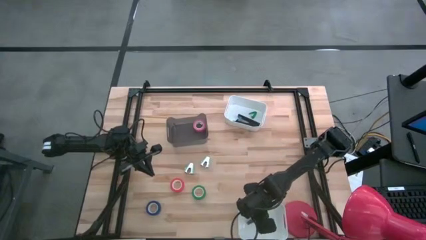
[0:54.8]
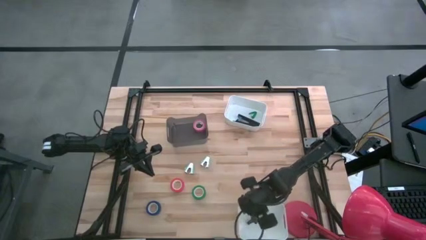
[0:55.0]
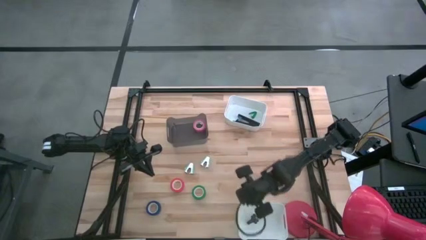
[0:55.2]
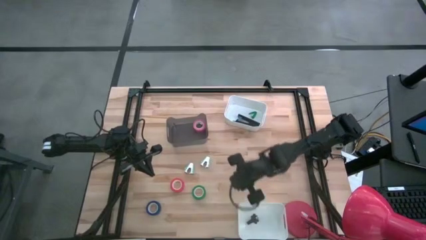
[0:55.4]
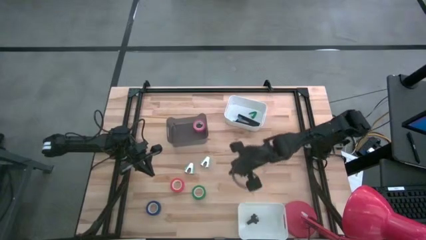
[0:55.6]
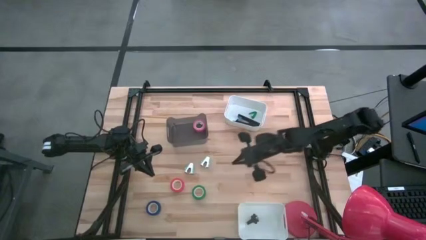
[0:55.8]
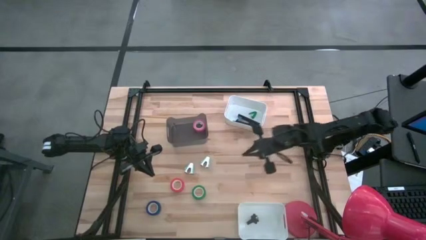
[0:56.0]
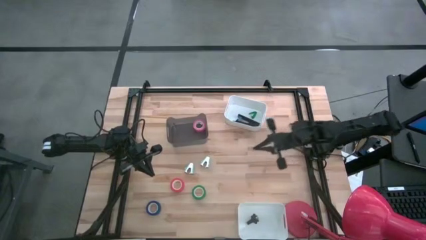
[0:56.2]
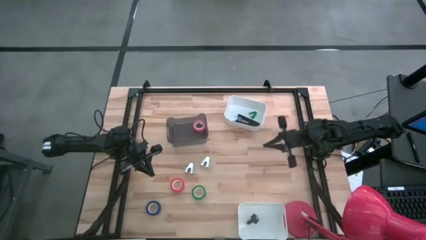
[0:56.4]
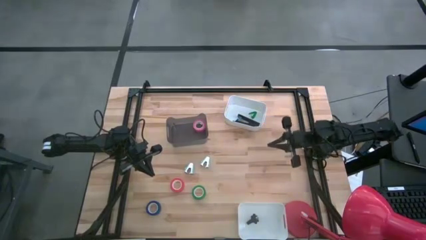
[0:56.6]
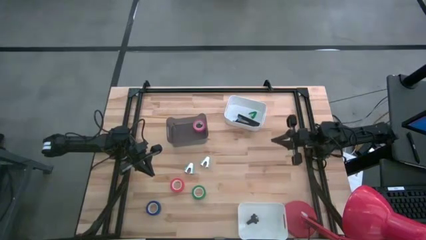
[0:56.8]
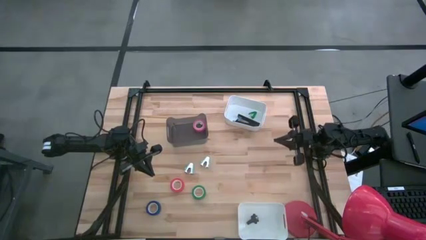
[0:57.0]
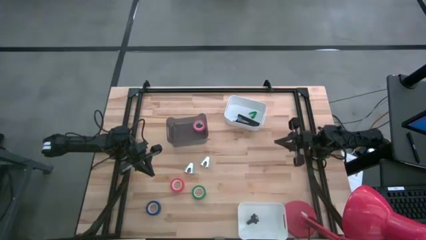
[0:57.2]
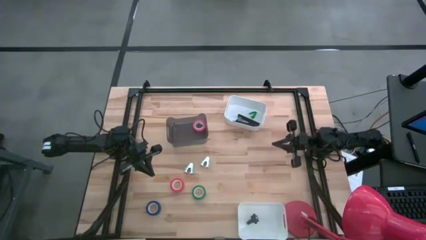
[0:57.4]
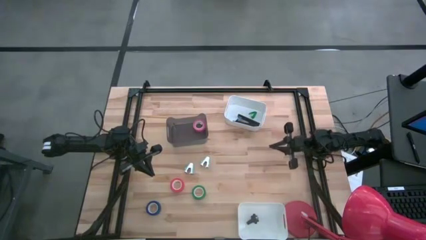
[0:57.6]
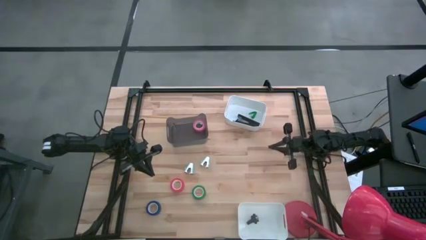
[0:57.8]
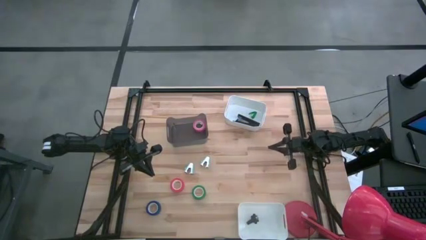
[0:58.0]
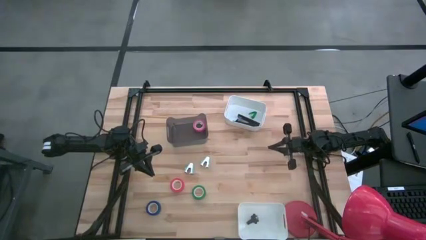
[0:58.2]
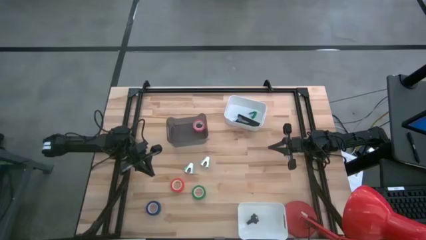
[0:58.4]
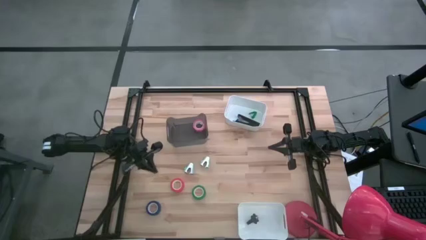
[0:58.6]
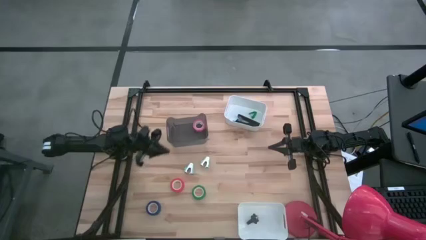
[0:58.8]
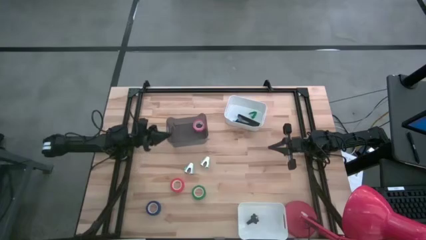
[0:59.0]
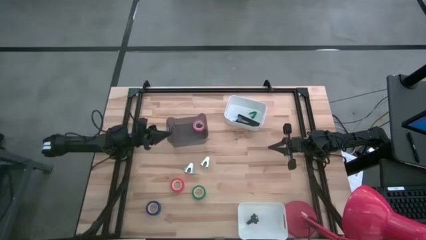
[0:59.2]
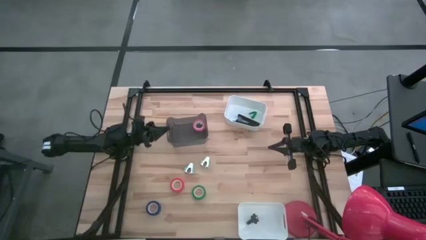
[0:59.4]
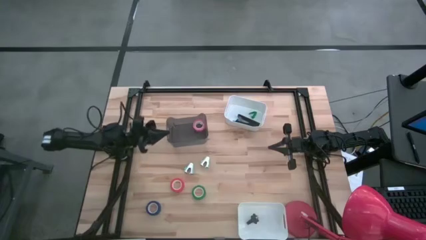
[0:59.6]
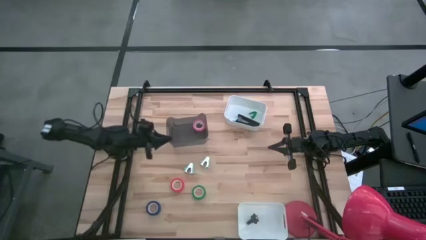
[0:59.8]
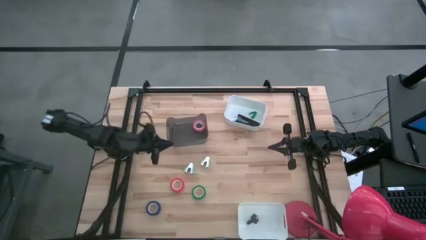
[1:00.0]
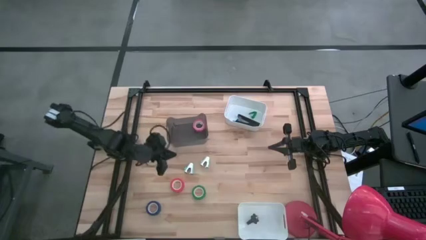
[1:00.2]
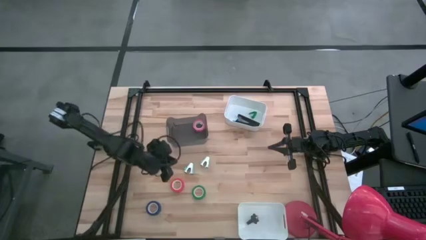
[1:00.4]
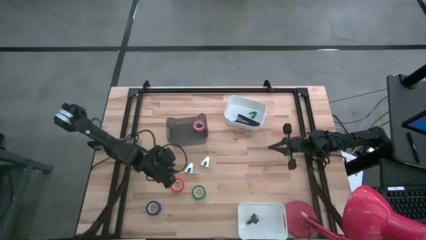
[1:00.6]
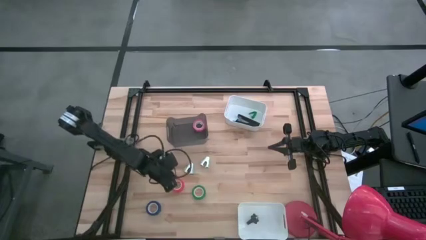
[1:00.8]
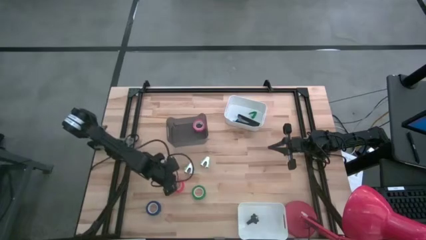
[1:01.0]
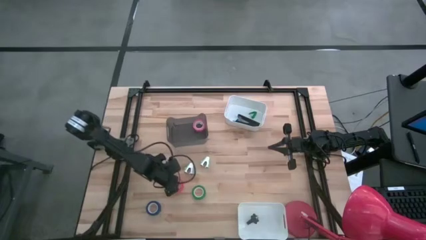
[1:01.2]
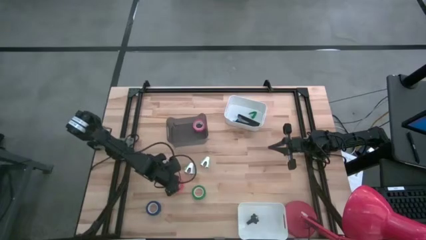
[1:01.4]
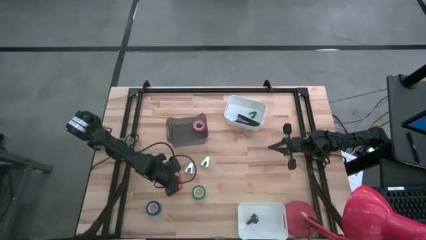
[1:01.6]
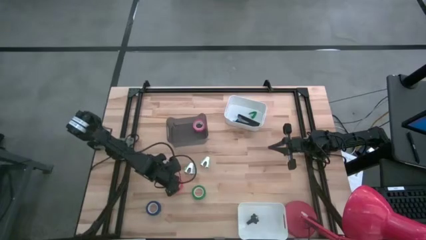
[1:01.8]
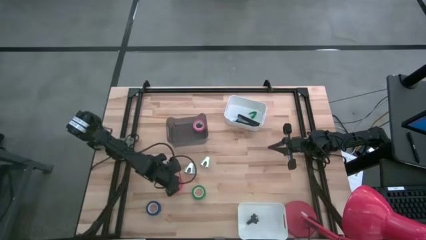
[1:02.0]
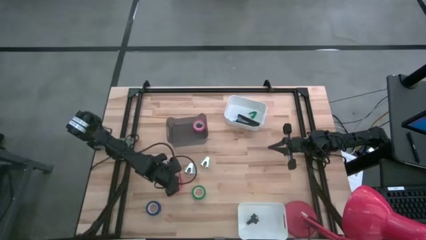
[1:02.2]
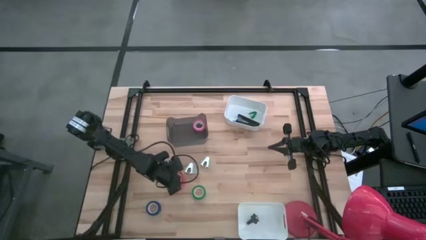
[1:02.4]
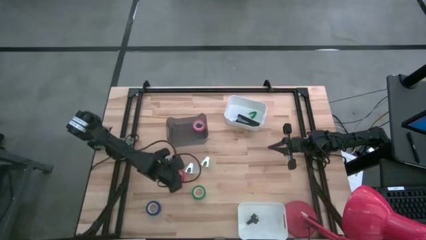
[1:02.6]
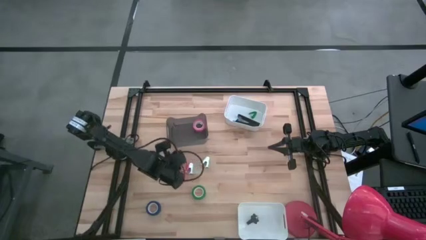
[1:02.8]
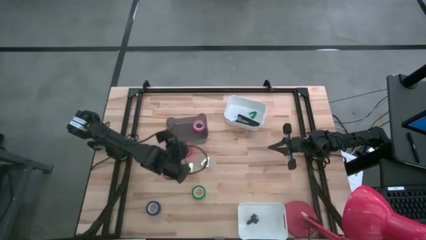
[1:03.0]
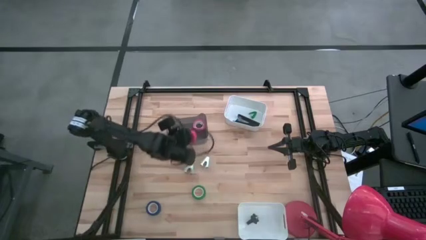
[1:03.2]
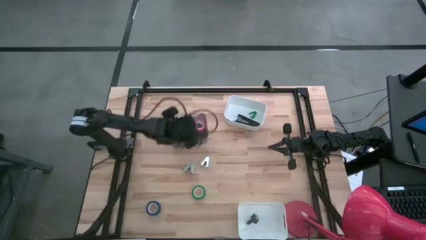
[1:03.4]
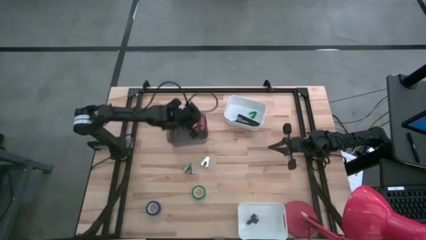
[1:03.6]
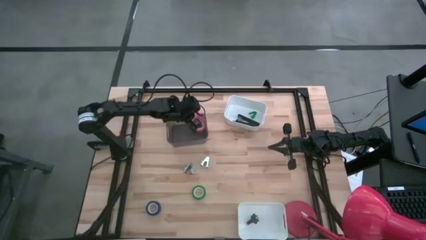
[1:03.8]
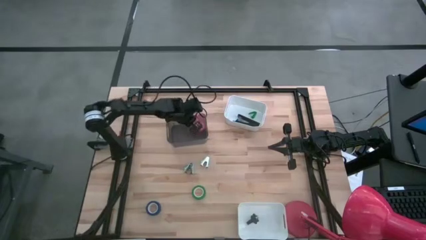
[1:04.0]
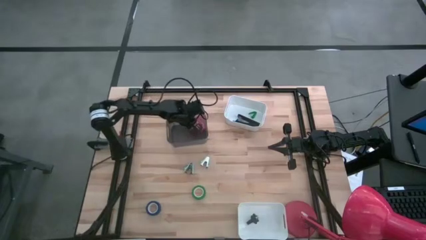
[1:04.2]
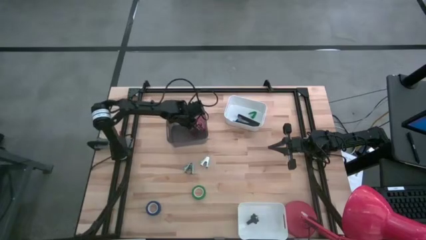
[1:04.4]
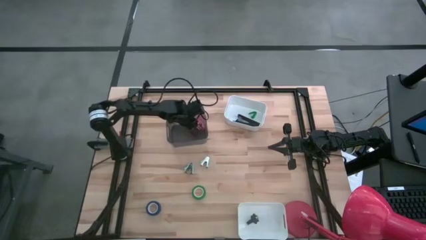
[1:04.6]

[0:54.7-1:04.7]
Task: Pick and place Stapler, Stapler remover, tape
Put the orange tape into the black bin

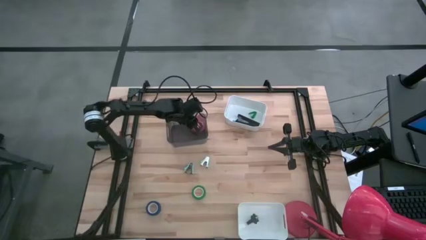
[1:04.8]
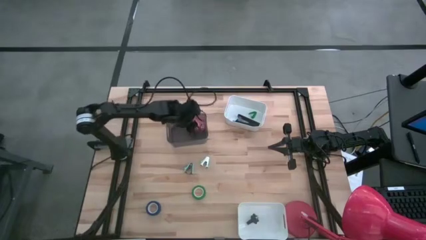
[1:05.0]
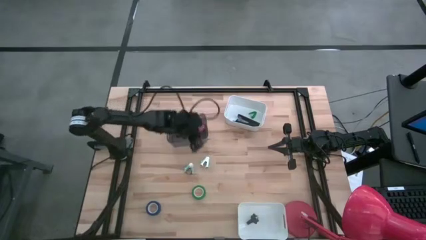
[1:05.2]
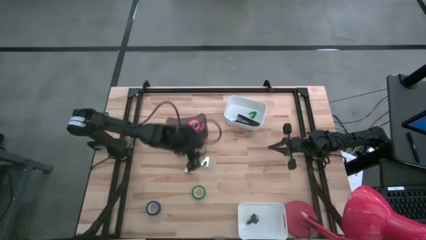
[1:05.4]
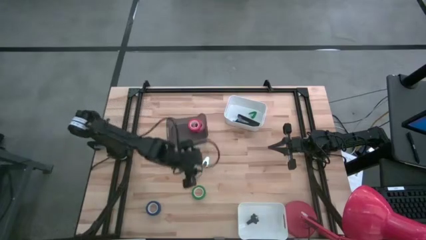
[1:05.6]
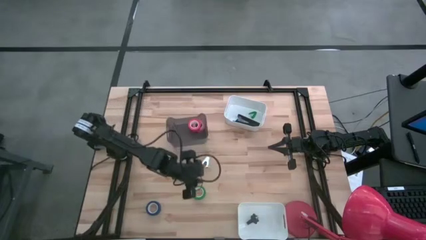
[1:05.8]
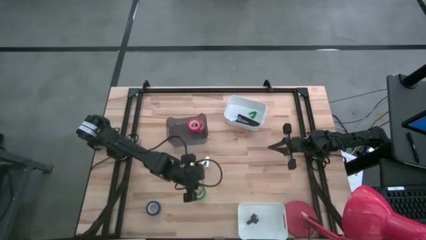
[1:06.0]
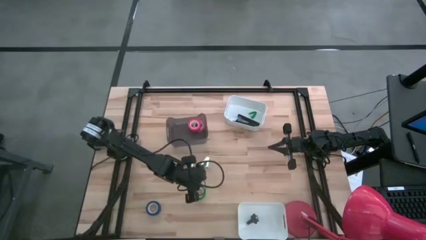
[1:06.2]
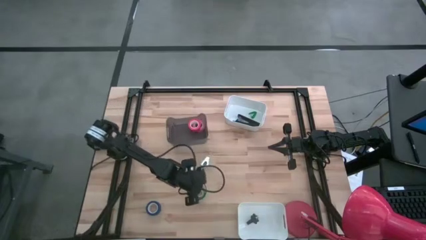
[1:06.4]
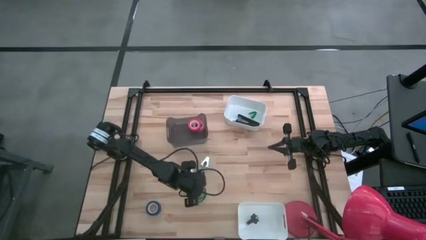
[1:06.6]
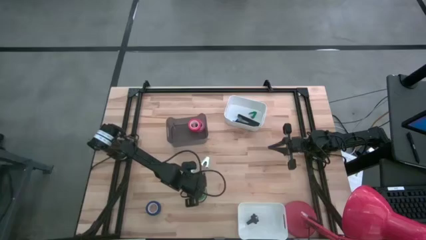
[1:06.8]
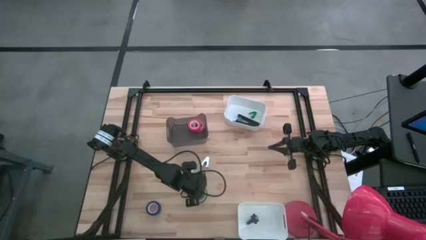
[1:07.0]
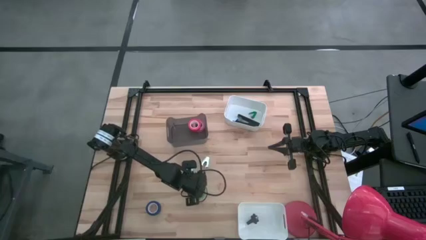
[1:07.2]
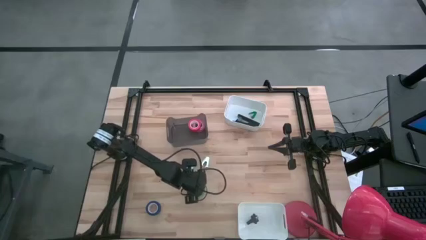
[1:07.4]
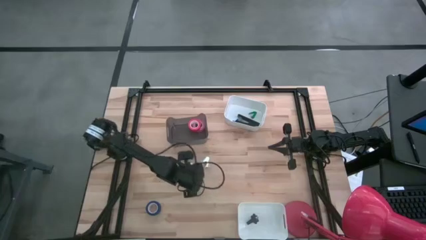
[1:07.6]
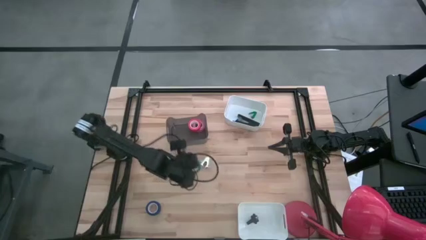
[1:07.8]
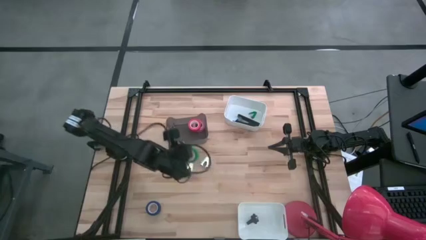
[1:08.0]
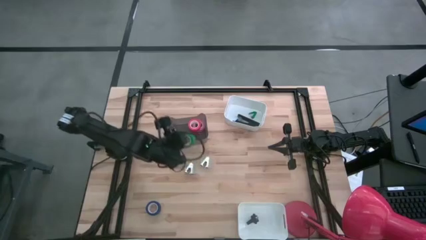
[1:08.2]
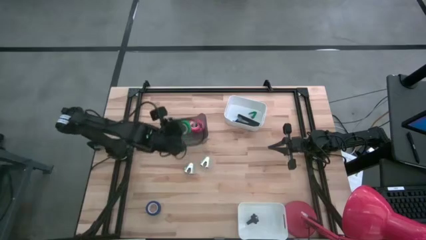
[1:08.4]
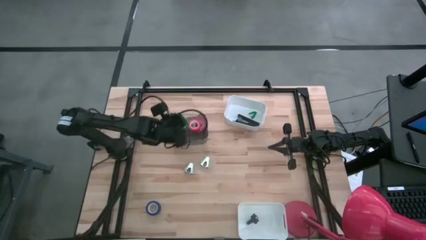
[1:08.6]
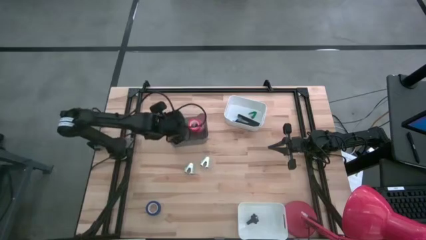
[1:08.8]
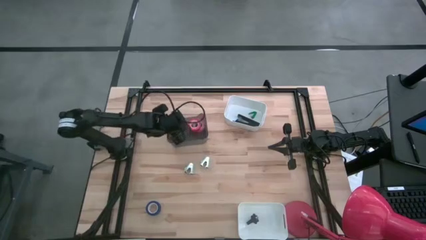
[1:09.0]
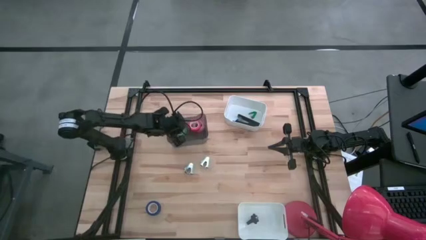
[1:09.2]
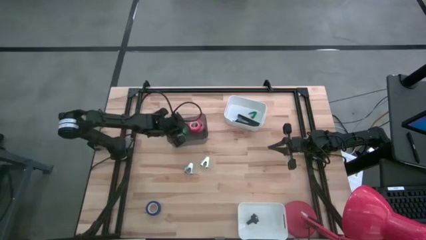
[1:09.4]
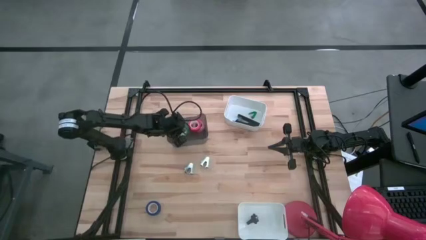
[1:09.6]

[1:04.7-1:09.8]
Put the green tape into the black bin

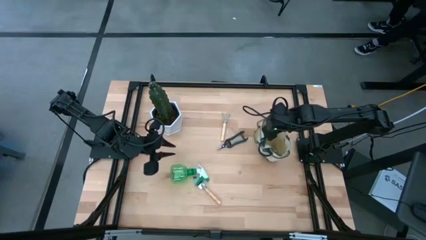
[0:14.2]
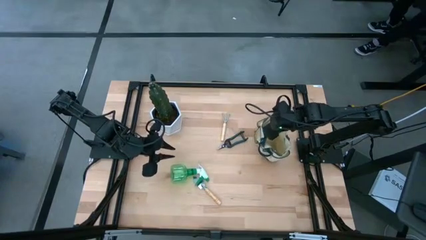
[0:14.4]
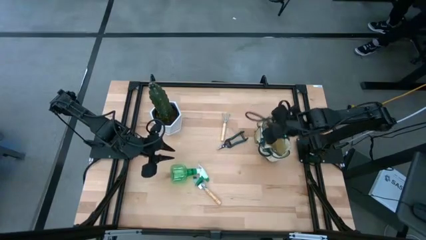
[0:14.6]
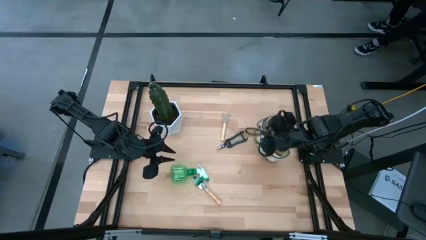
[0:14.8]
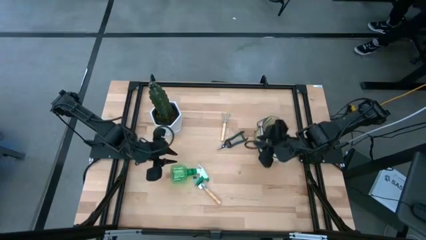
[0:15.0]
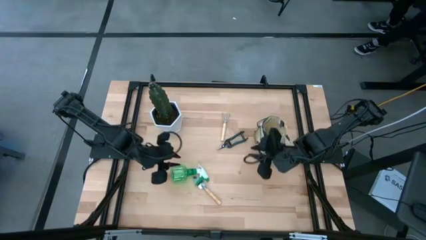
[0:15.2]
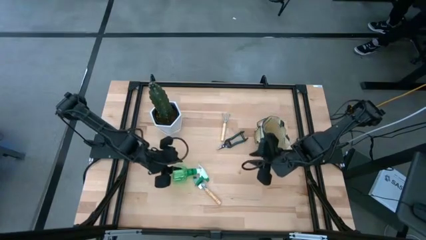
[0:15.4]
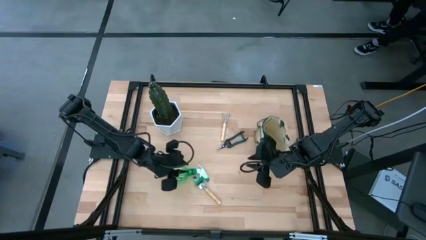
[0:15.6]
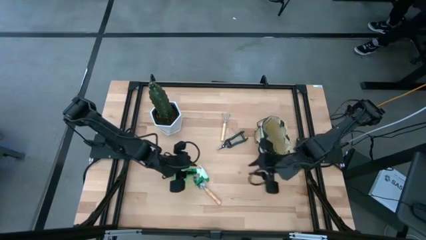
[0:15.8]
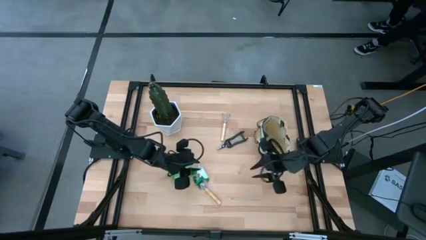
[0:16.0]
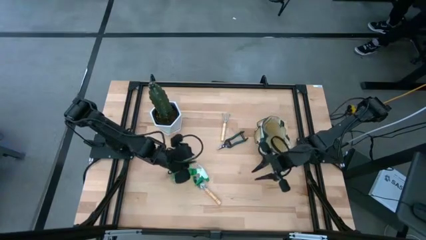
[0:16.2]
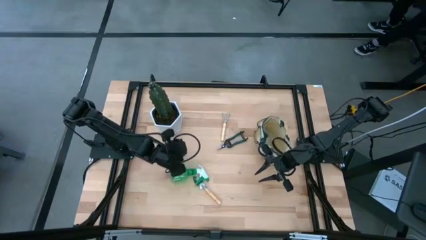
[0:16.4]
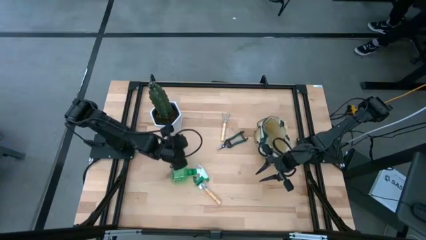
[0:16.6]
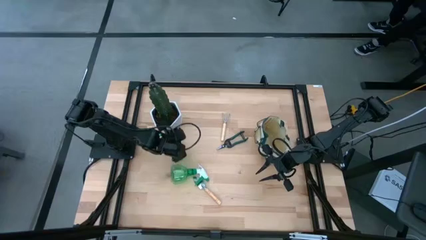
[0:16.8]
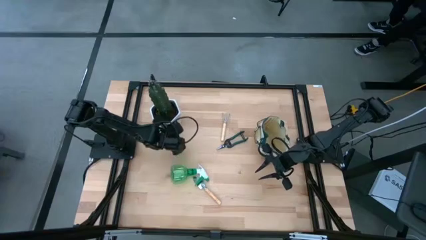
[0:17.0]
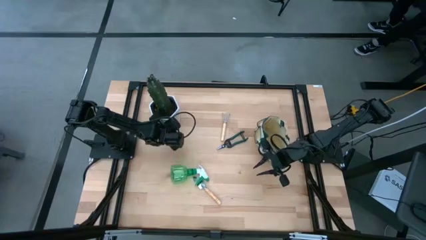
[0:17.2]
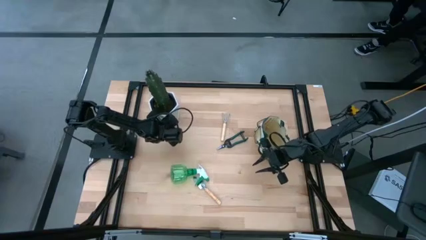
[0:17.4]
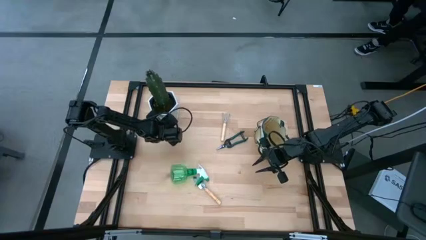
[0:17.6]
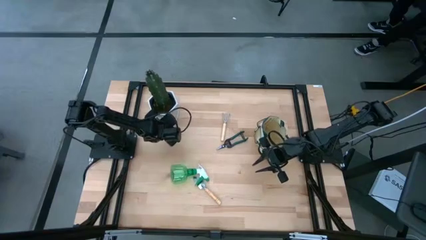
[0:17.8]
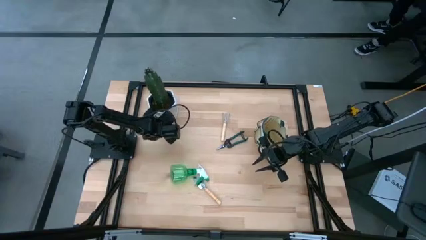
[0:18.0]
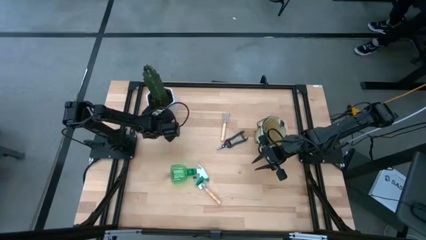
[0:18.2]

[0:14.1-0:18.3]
Task: Pick & Place Garden tools in Gardening bag
Adjust the cactus pot
